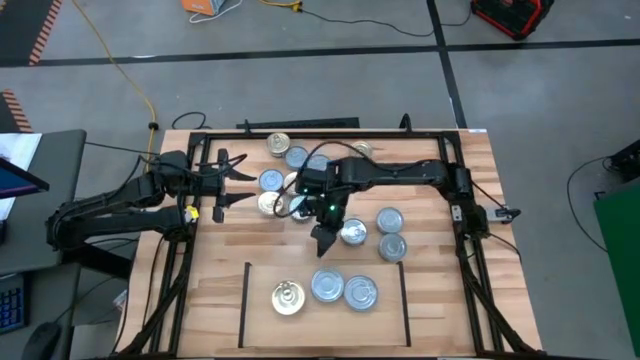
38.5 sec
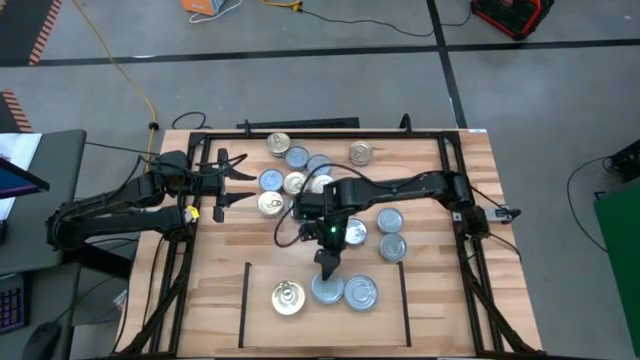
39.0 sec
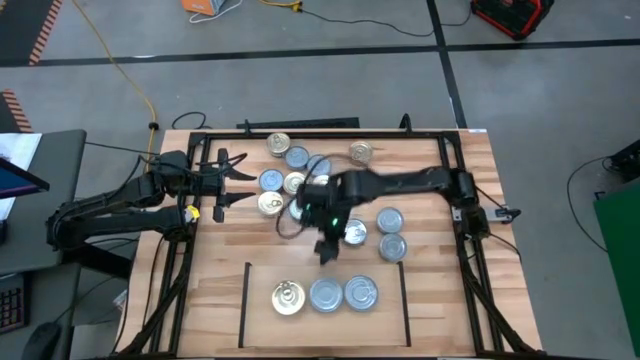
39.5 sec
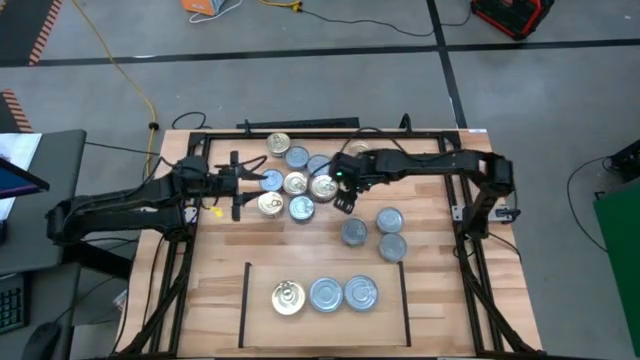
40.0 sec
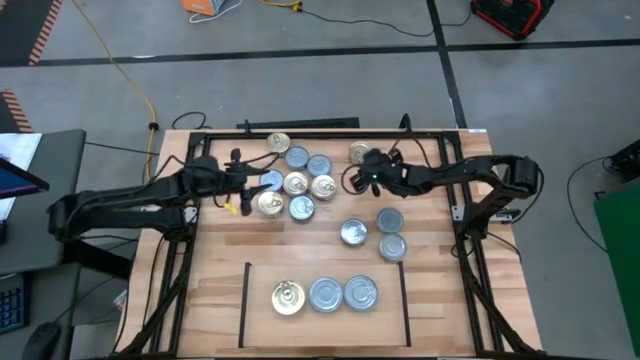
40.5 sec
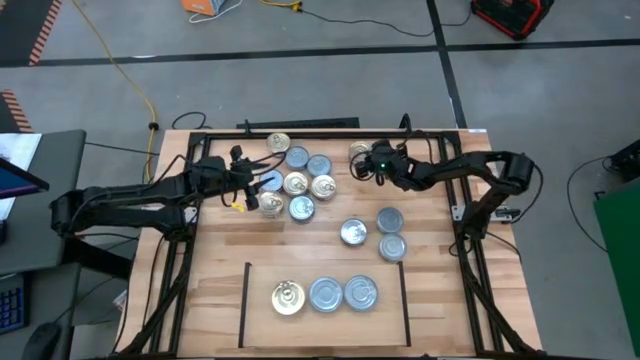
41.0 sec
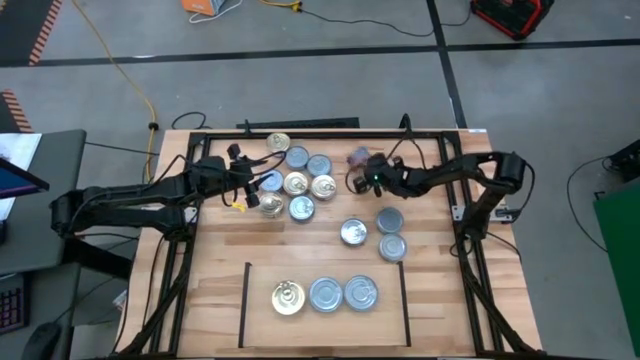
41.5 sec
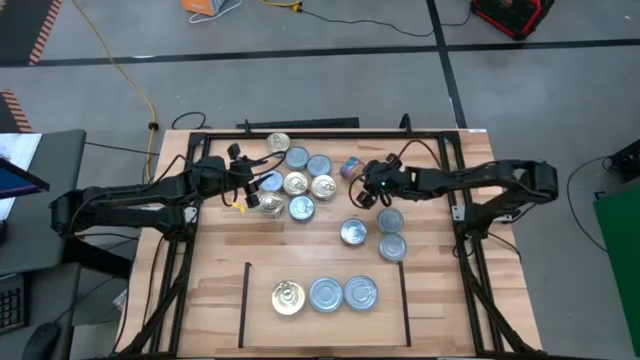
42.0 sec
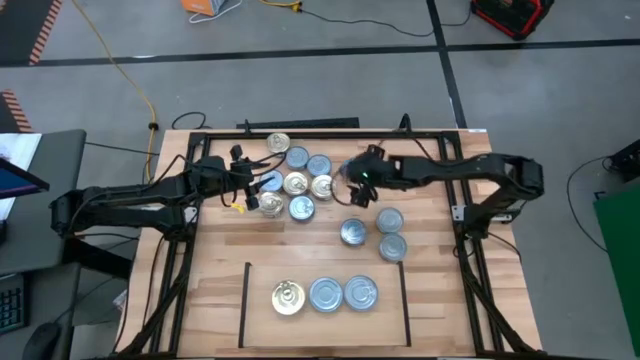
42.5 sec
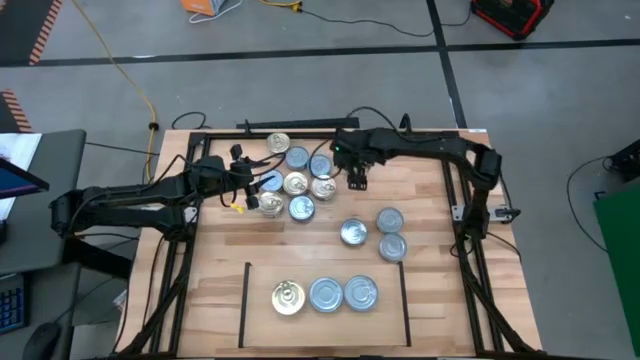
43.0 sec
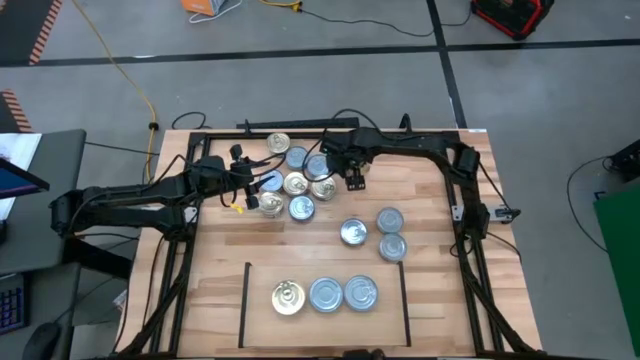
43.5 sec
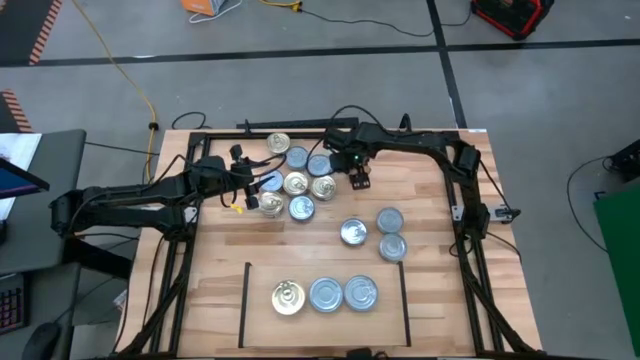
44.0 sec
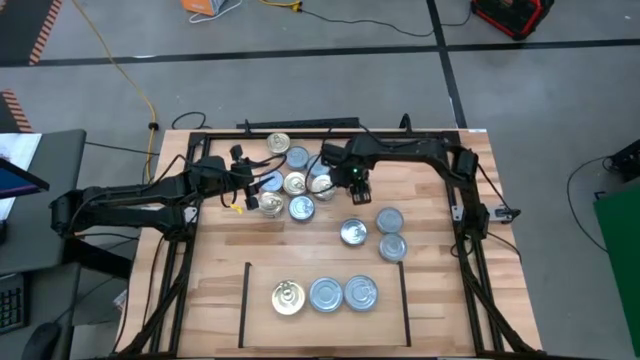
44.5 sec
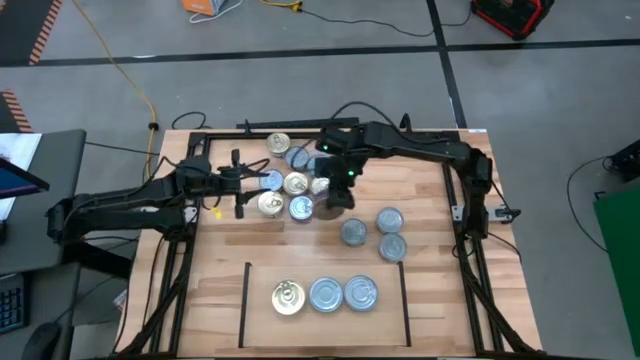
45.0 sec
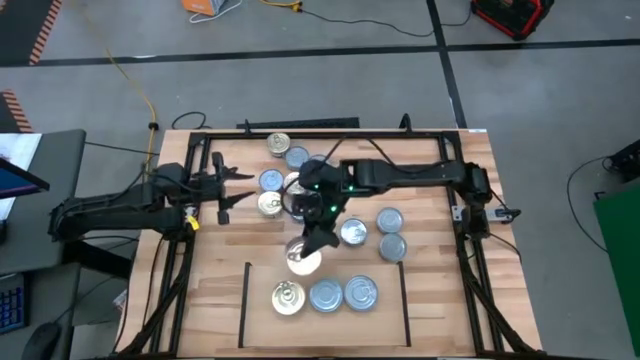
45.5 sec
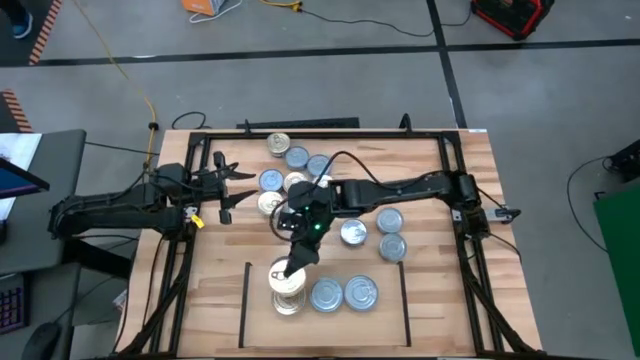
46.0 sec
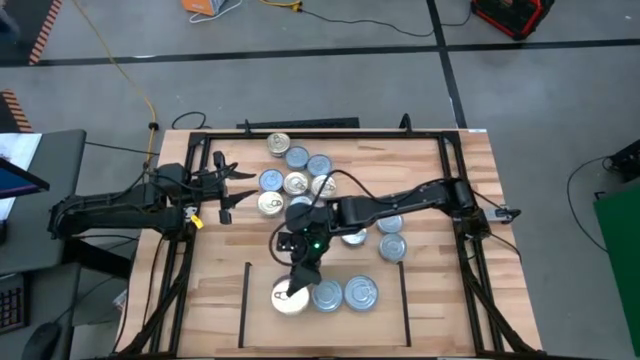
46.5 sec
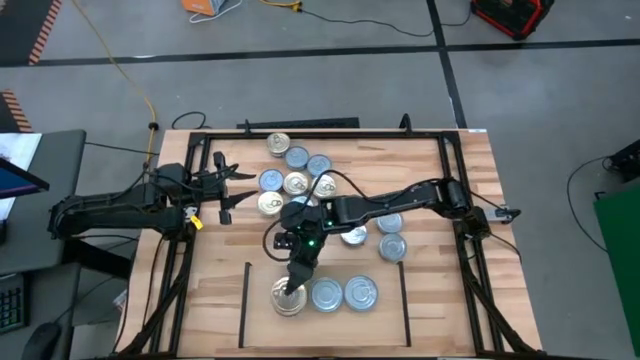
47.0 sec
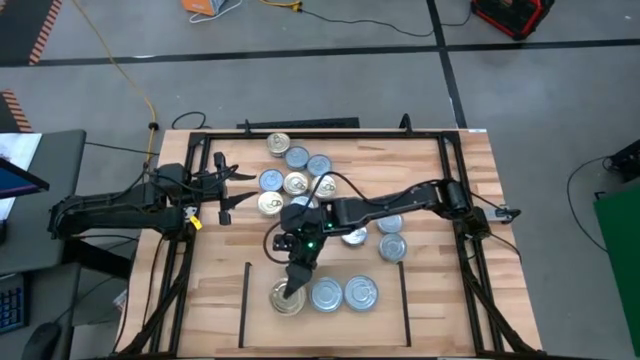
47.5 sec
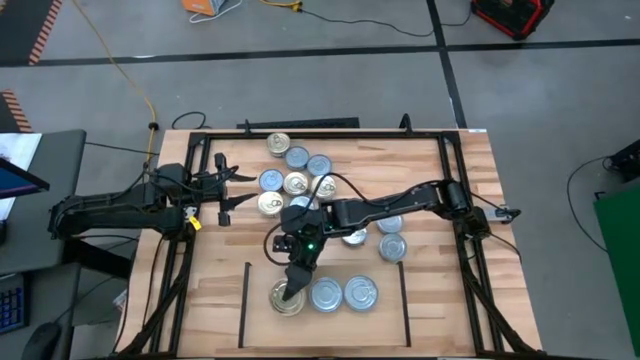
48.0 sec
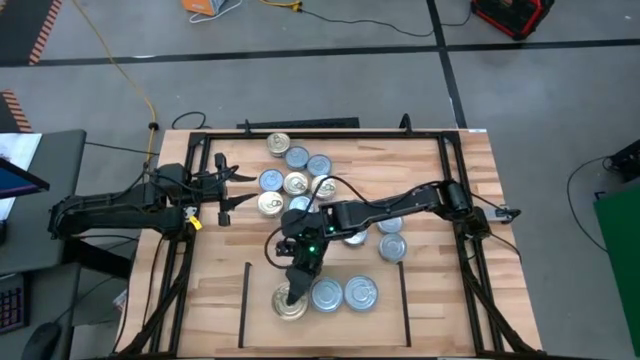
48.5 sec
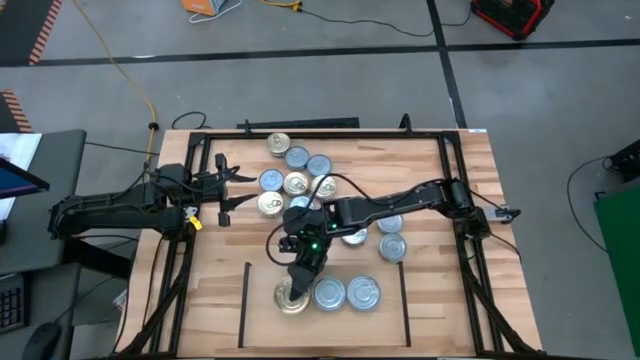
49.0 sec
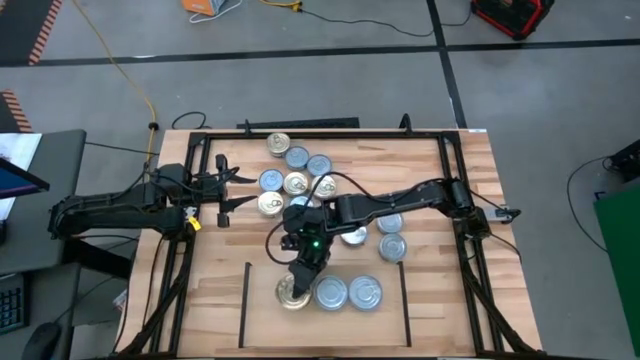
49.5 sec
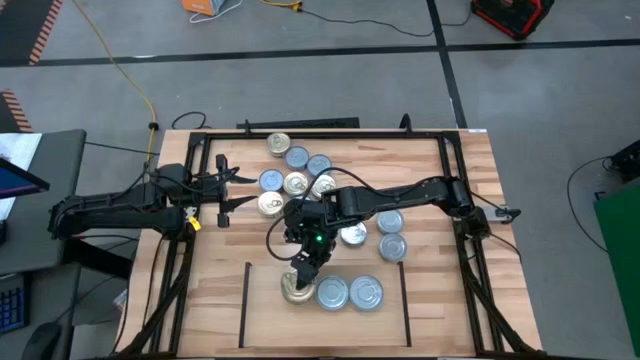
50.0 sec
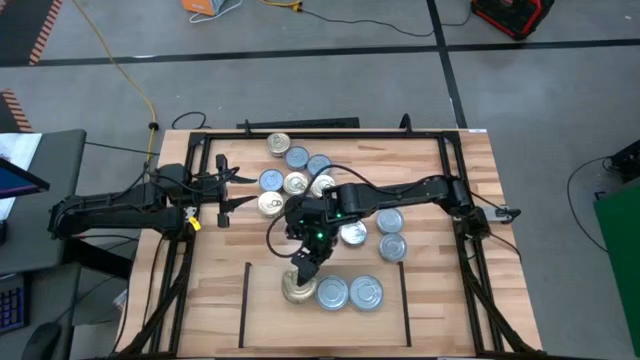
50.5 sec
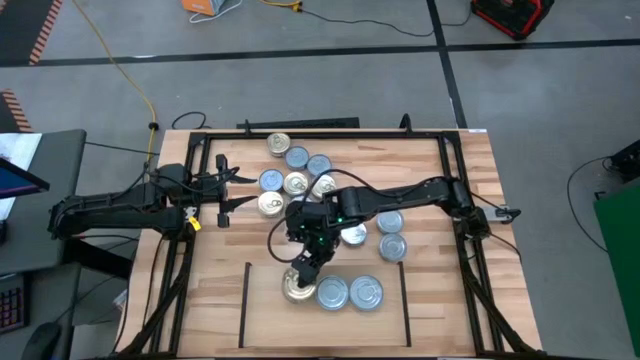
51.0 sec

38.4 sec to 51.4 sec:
Task: Stack canned seafood by type on shelf
Put the blue and pink tuna can on the top of the blue and pink tuna can on the shelf

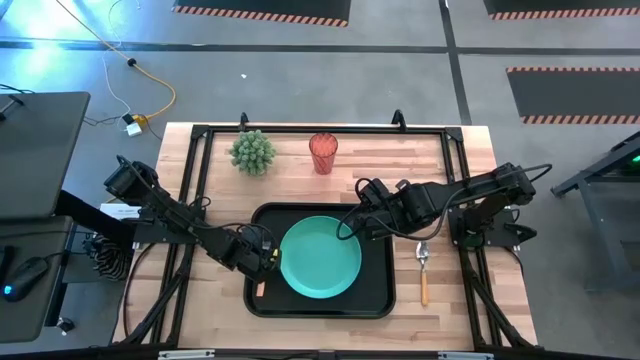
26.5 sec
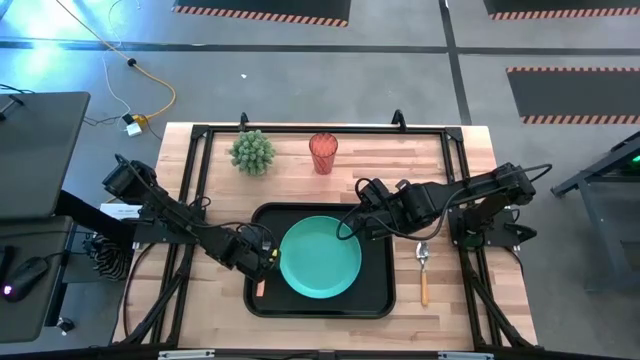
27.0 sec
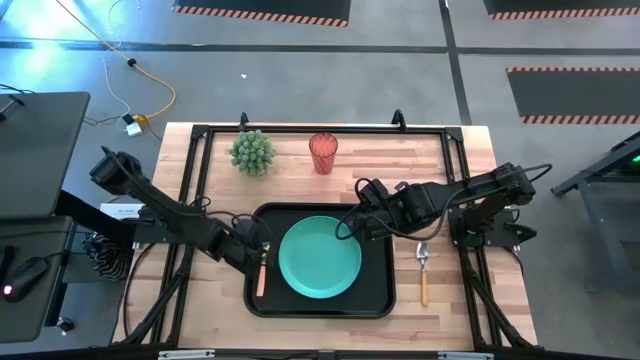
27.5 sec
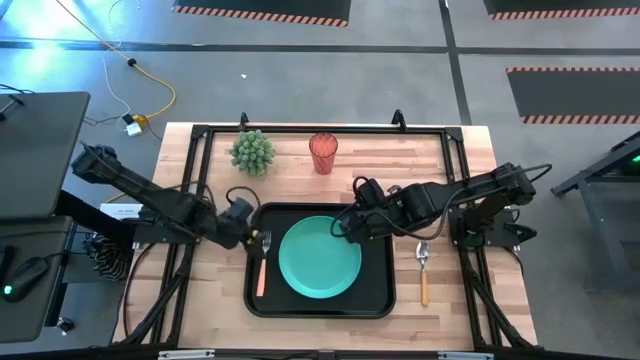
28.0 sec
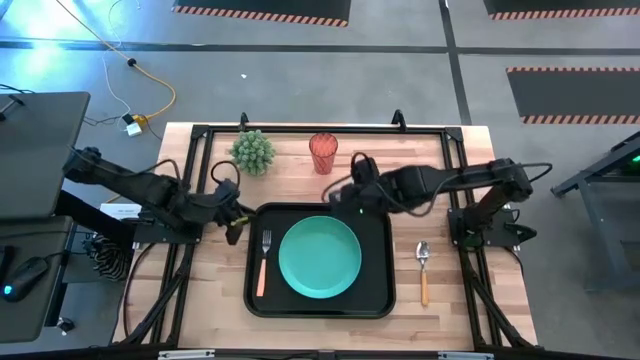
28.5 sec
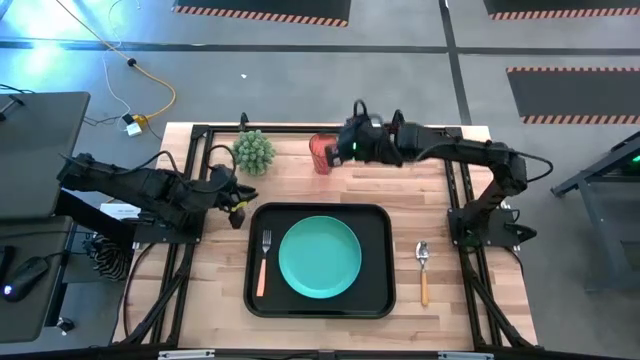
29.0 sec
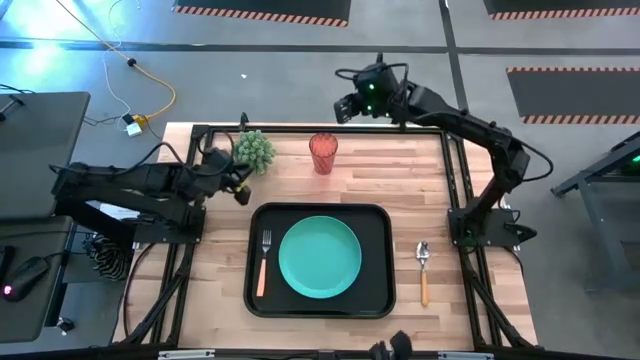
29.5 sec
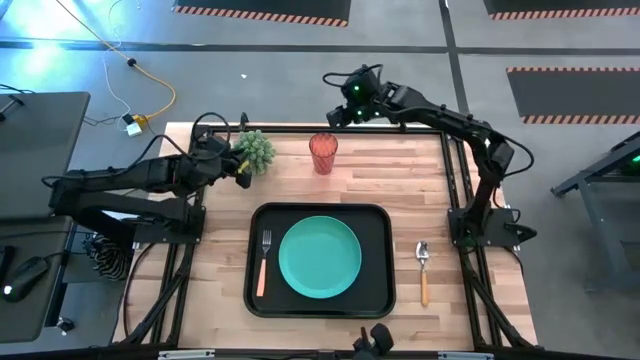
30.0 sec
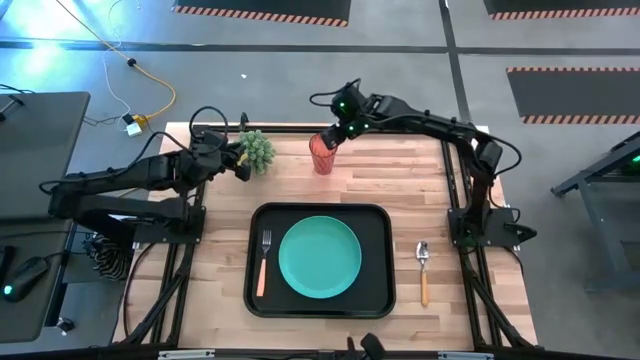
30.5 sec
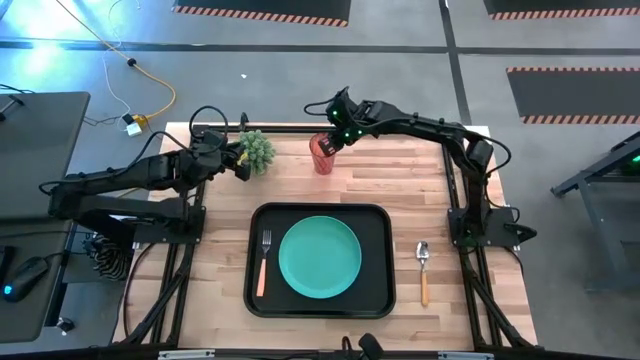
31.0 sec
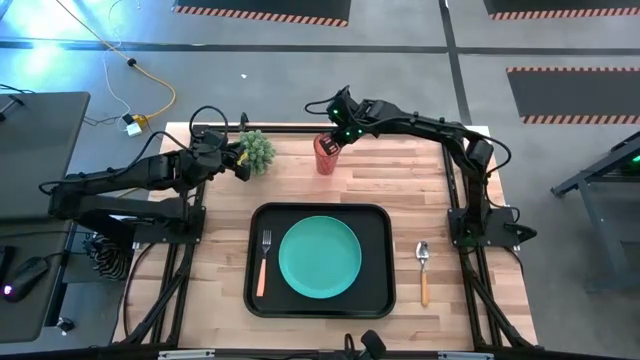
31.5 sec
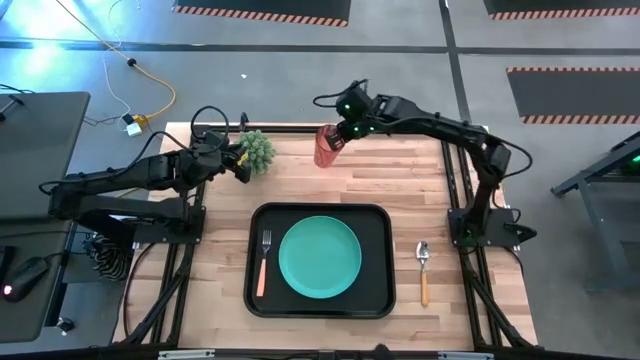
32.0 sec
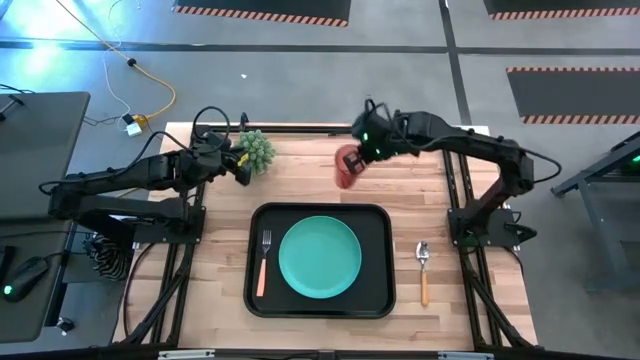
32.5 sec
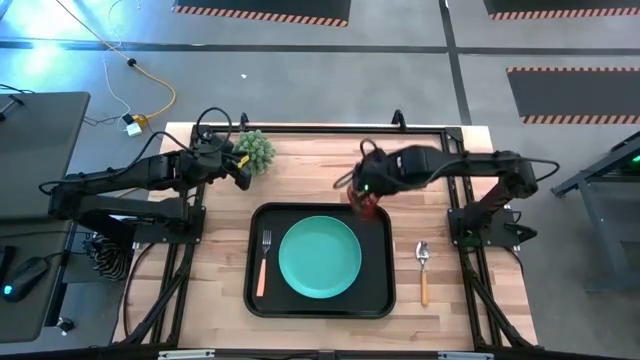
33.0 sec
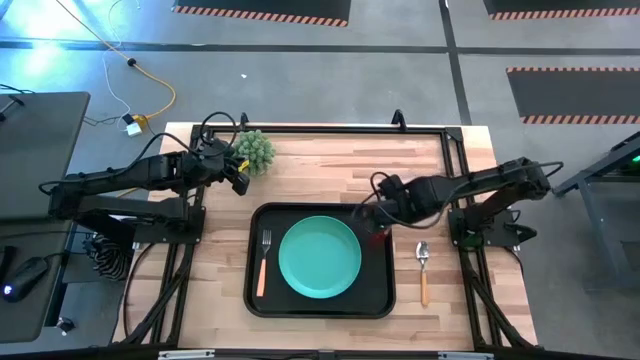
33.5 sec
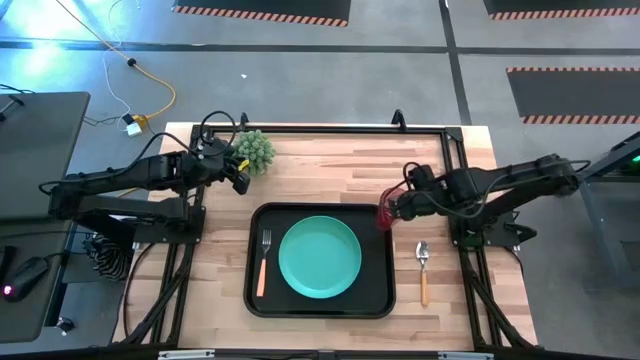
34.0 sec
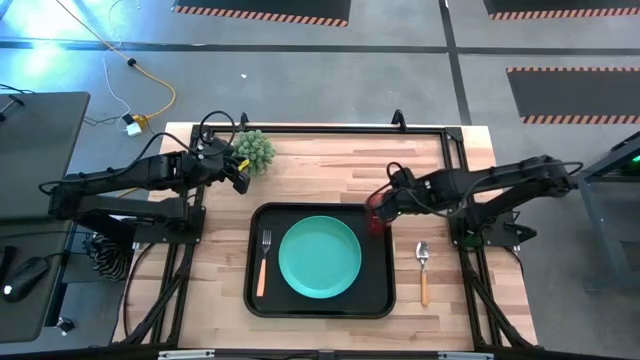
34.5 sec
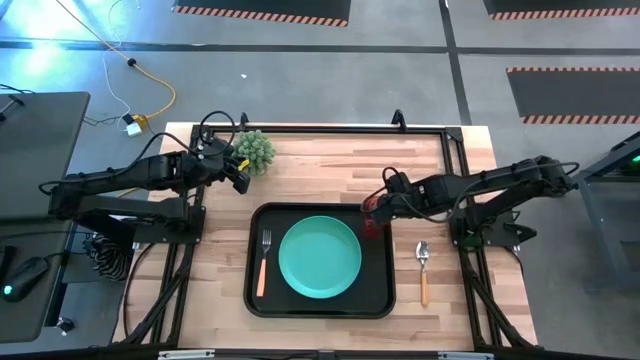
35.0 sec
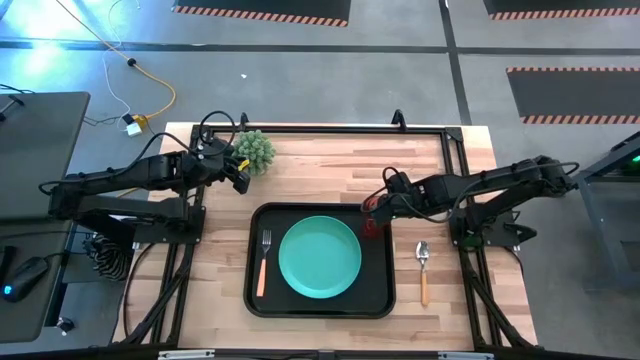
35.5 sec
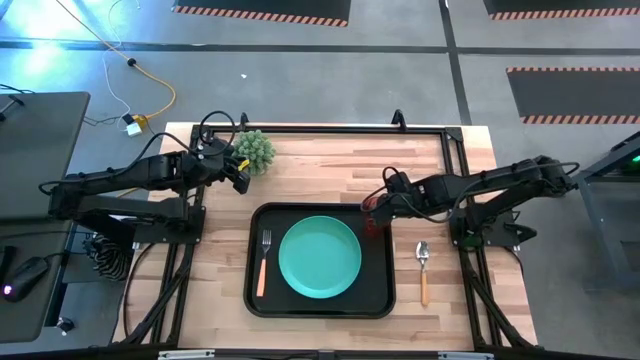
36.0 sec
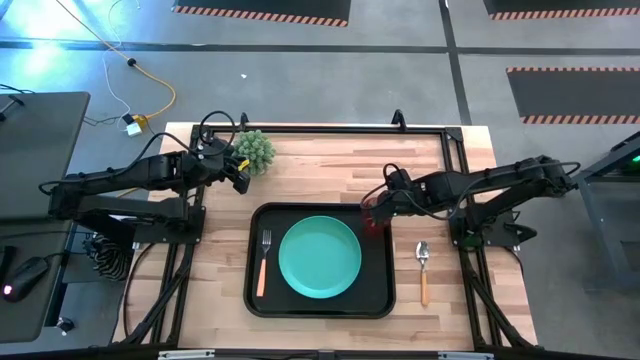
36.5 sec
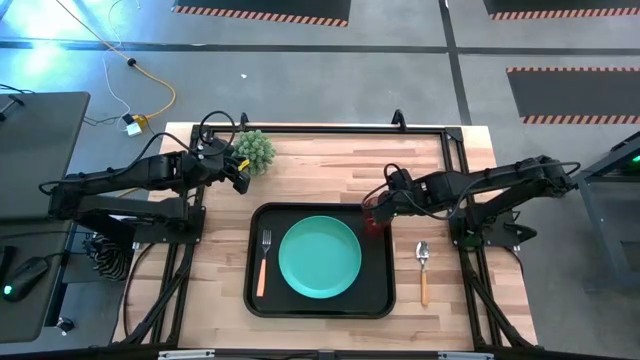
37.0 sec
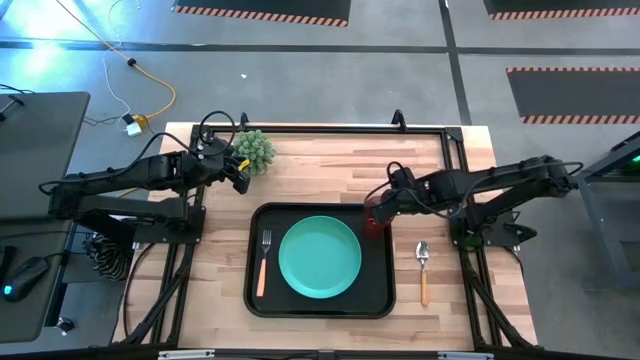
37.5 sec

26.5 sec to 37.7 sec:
Task: Pick and place plate/cup/fork/spoon on tray
Put the red cup on the black tray to the top right of the green plate
